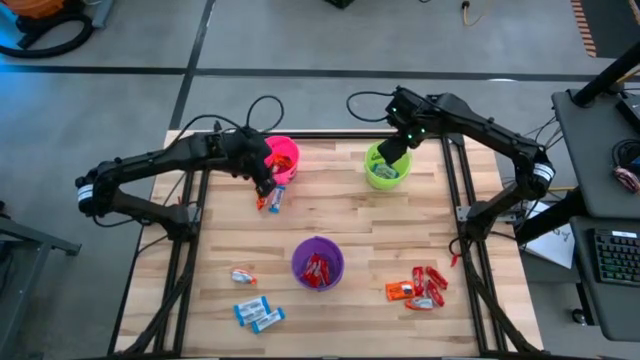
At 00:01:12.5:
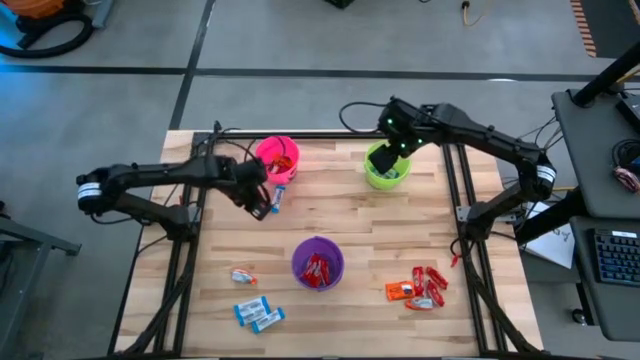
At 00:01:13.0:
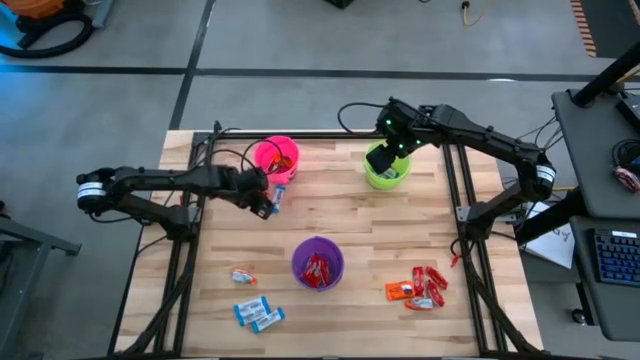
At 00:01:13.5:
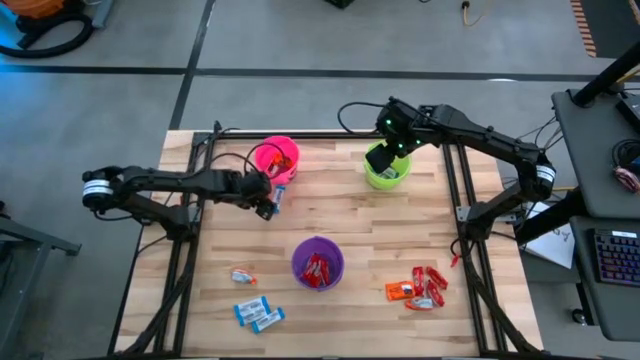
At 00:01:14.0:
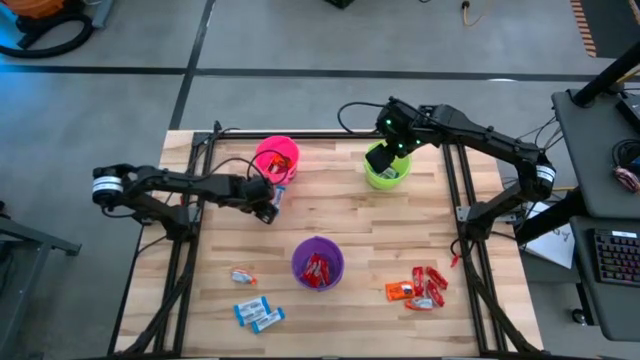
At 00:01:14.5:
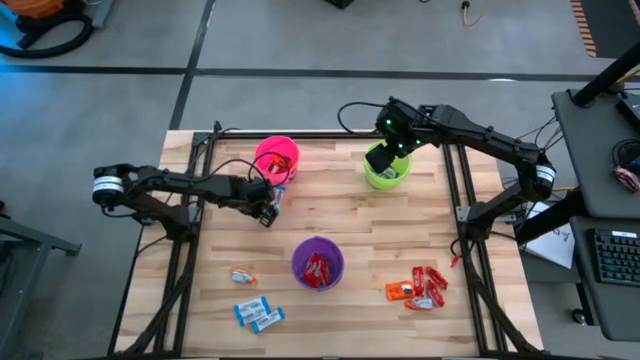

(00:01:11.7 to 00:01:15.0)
Task: Sort candy
Put the orange chocolate into the pink bucket

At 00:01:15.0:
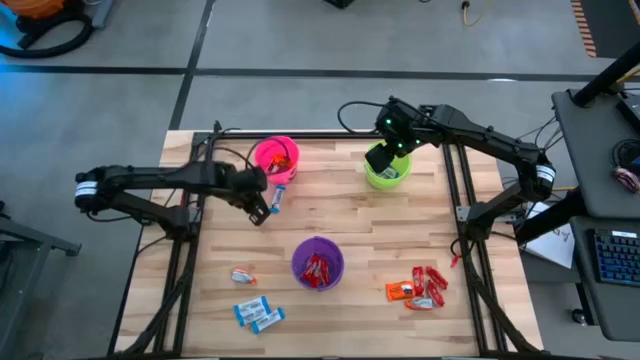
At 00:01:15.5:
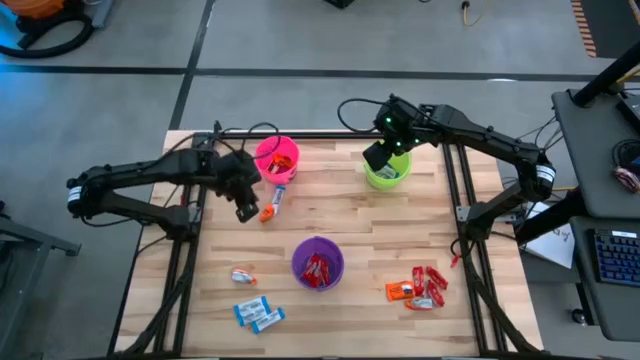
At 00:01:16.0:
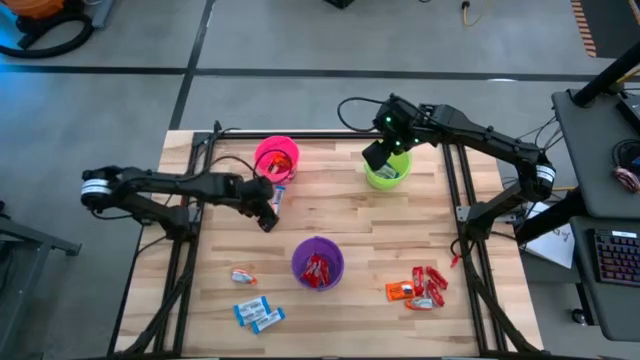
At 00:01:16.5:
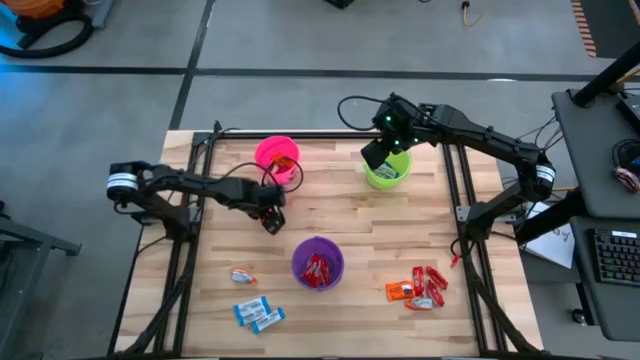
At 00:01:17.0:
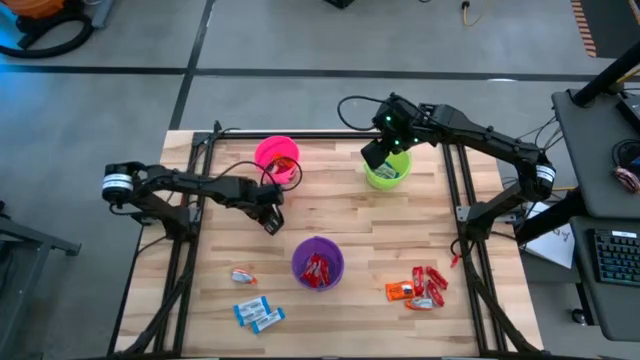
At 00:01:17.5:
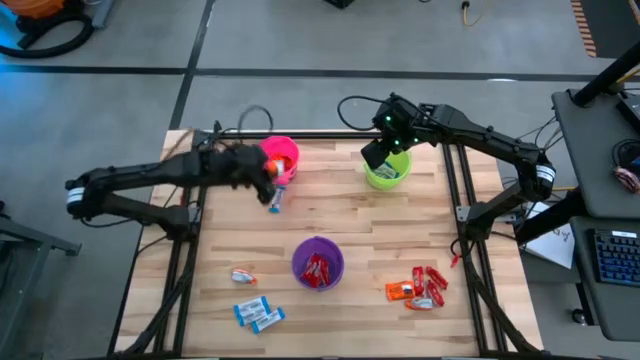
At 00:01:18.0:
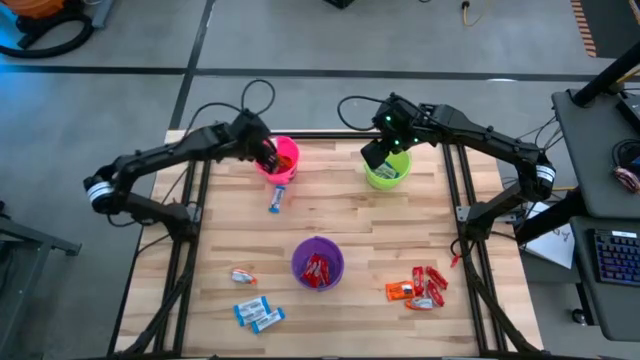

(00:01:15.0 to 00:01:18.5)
Put the orange chocolate into the pink bucket

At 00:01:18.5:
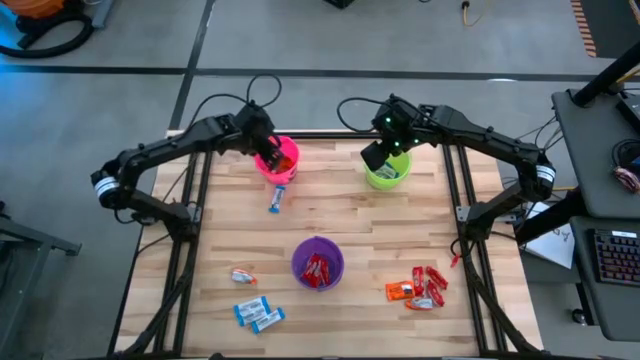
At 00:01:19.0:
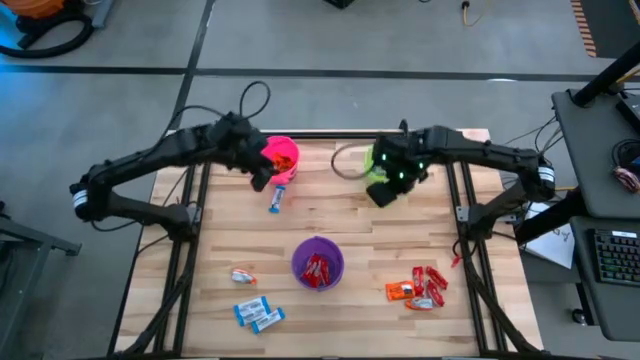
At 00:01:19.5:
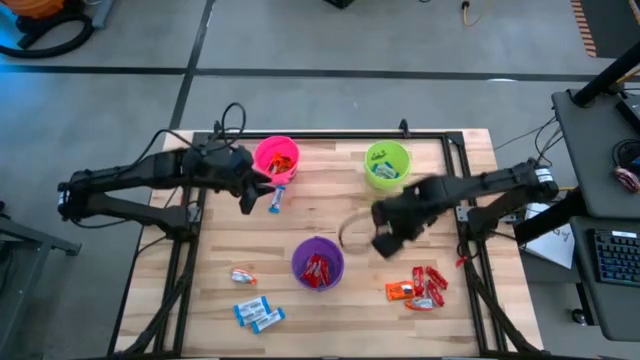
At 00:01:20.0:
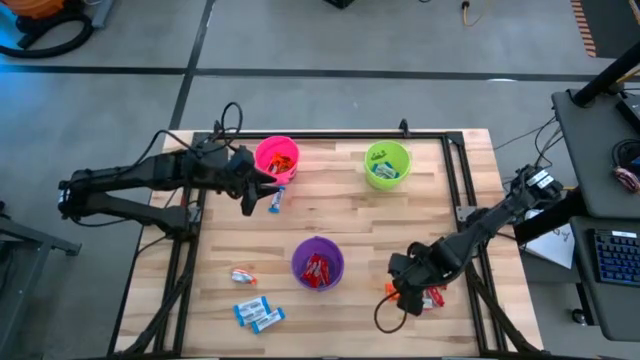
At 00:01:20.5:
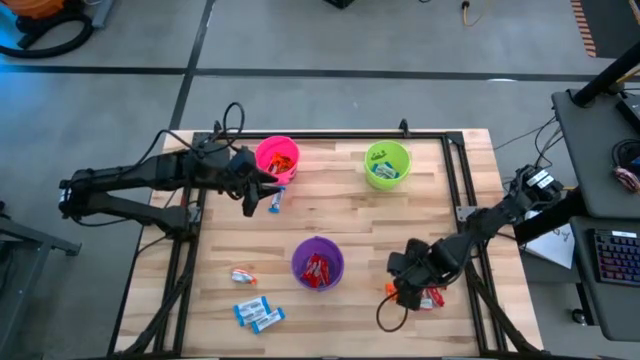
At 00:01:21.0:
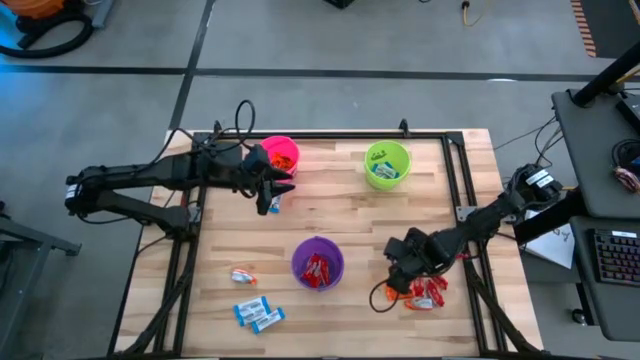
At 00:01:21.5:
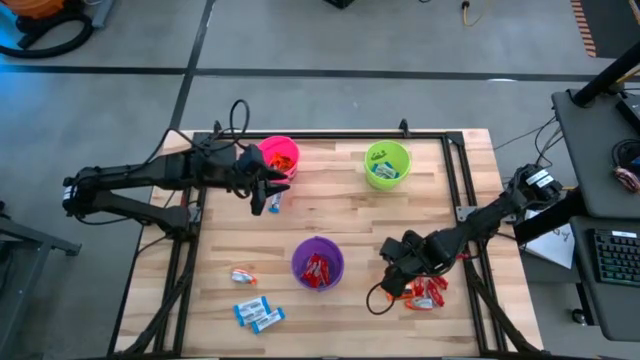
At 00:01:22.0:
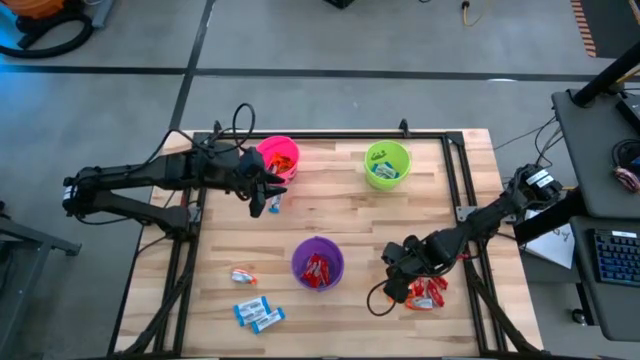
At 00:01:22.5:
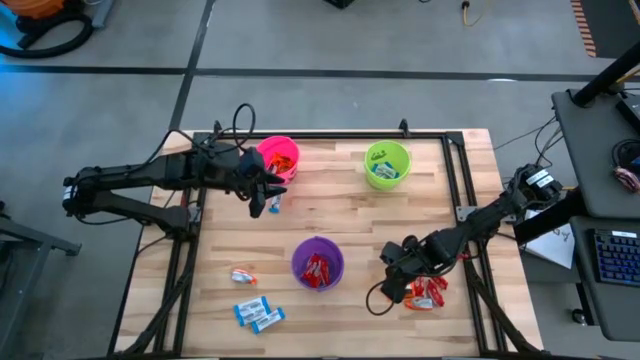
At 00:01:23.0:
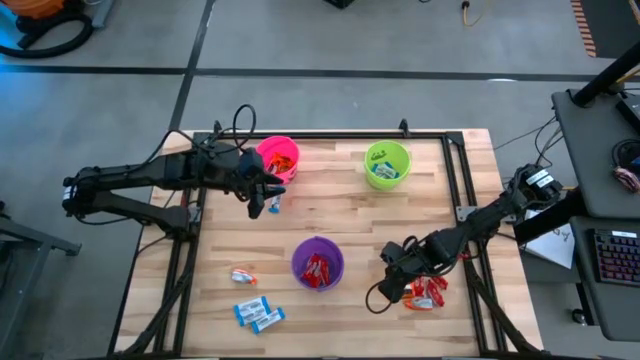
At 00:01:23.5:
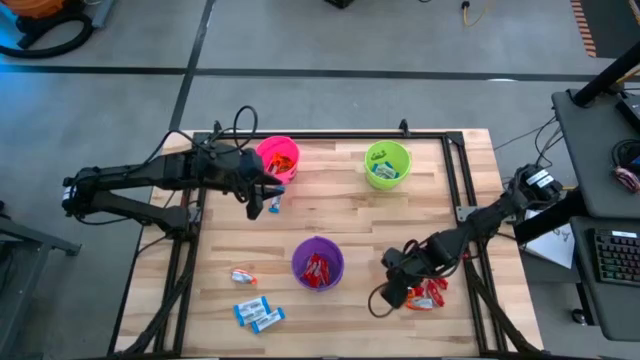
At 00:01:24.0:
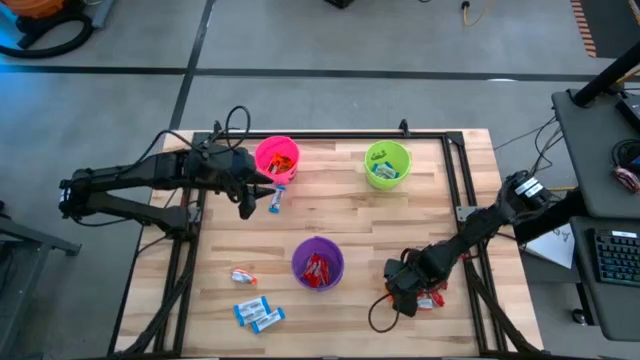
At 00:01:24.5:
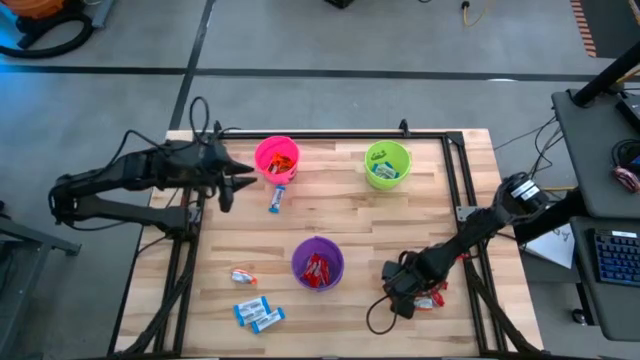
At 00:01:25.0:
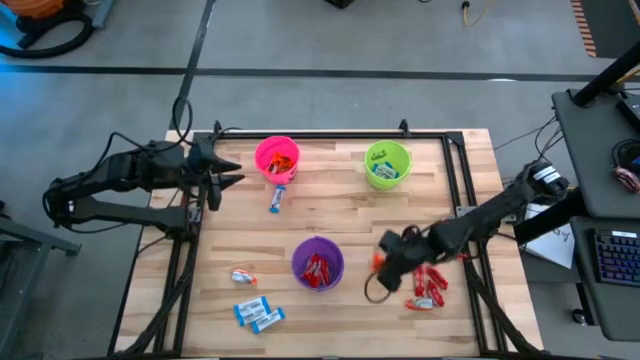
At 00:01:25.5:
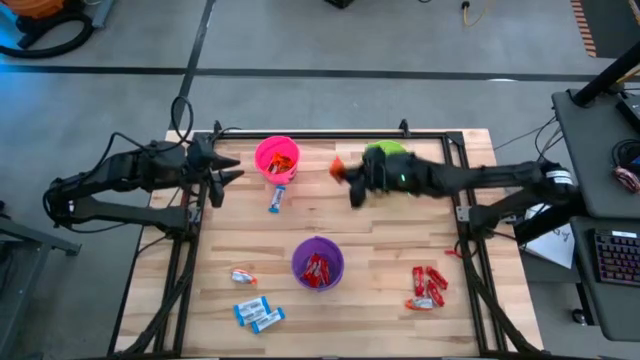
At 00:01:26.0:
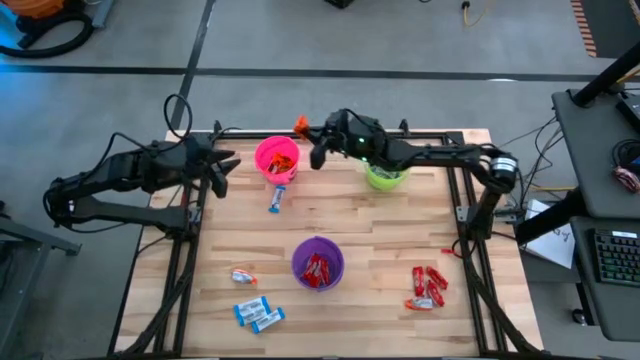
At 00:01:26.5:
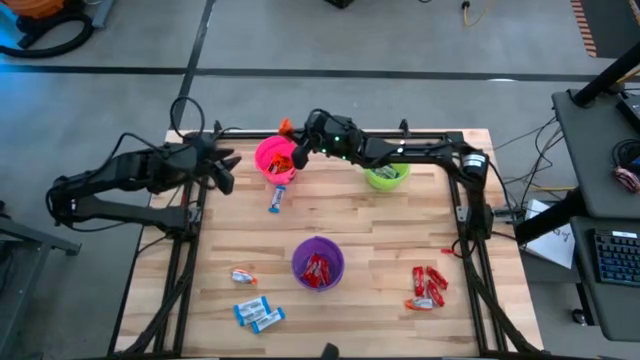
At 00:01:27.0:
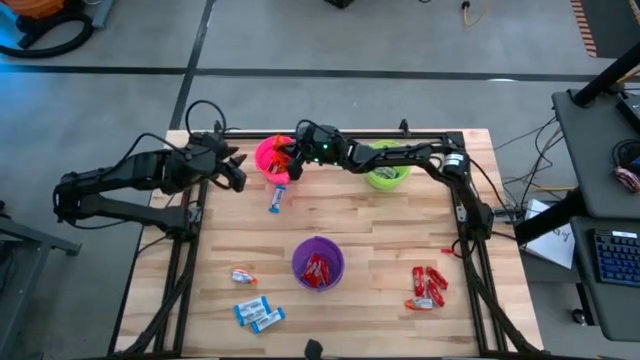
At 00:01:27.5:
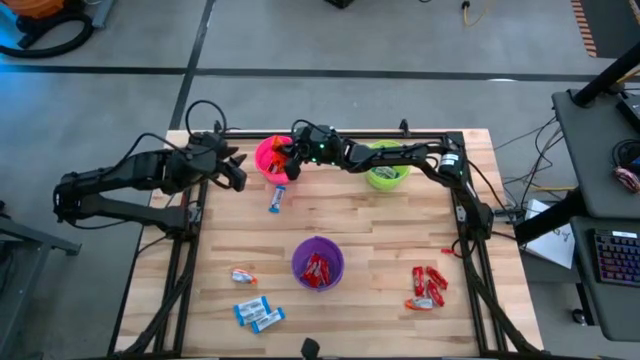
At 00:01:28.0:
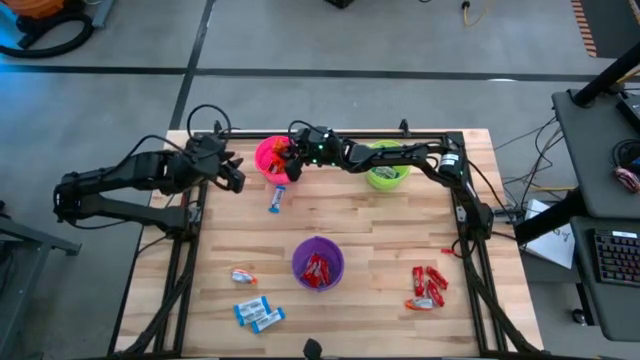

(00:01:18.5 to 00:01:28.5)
Put the orange chocolate into the pink bucket

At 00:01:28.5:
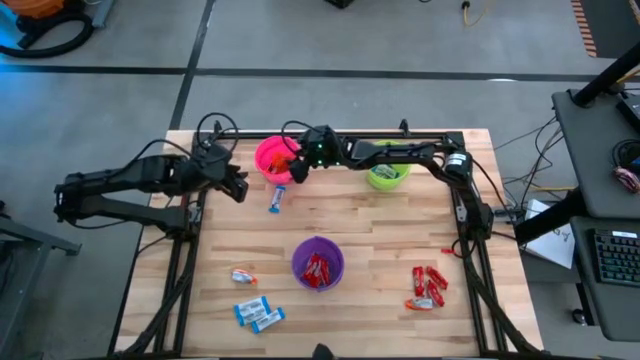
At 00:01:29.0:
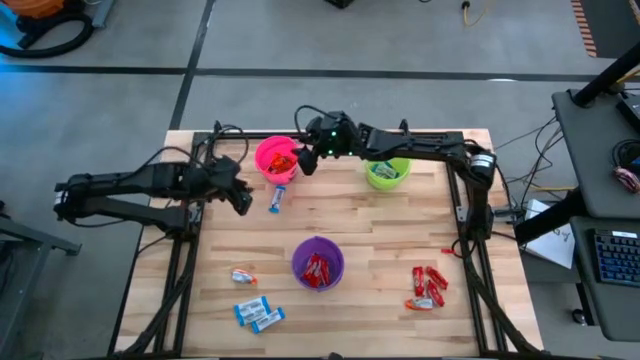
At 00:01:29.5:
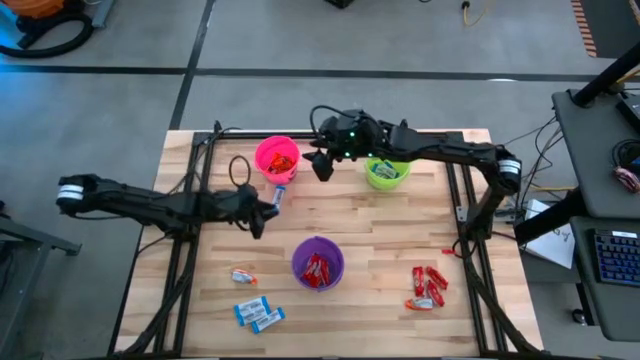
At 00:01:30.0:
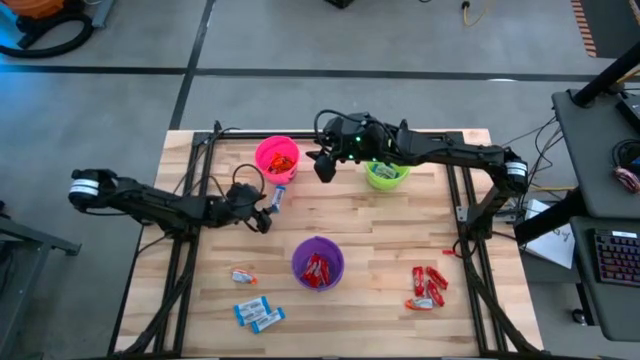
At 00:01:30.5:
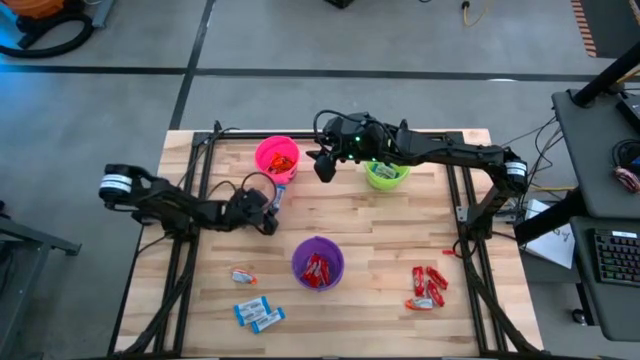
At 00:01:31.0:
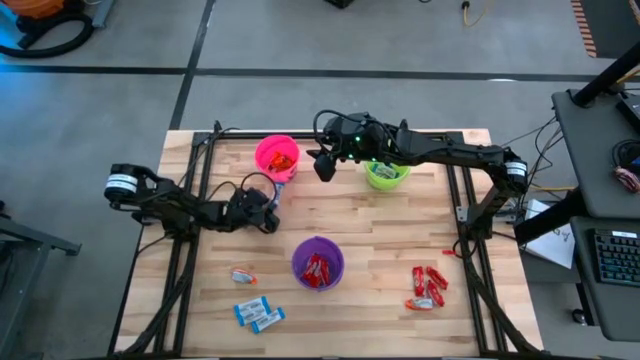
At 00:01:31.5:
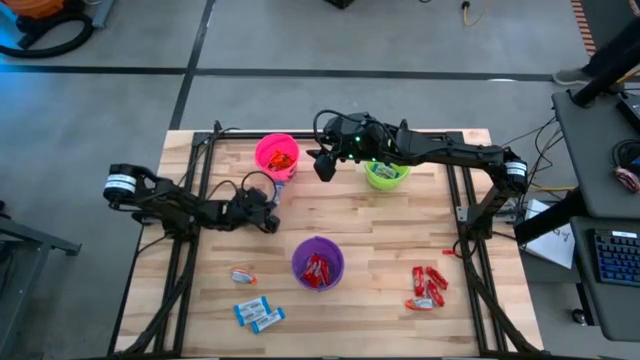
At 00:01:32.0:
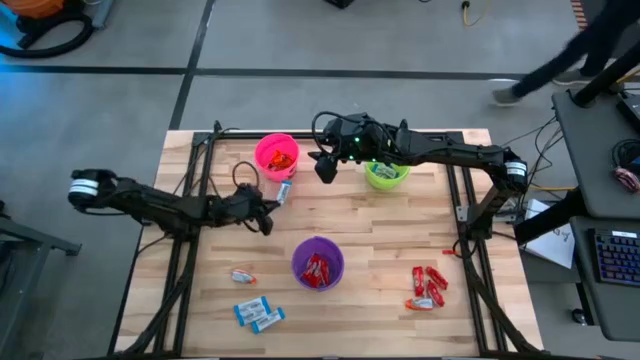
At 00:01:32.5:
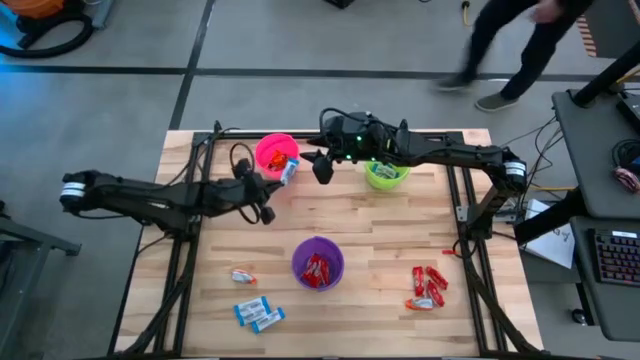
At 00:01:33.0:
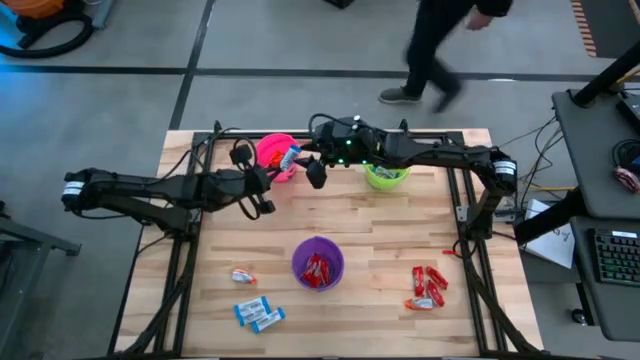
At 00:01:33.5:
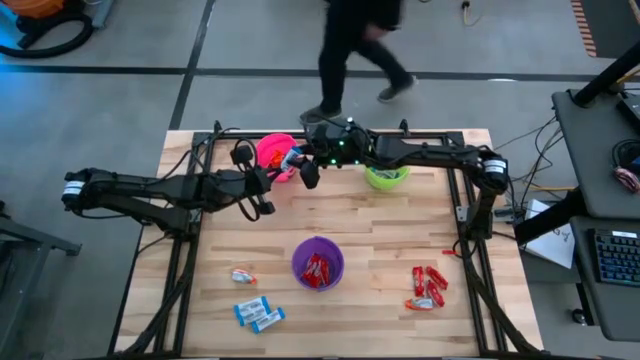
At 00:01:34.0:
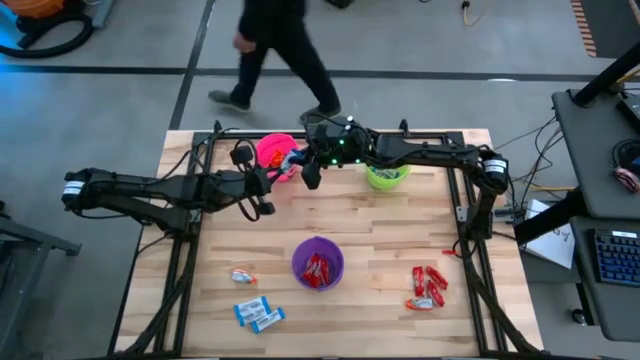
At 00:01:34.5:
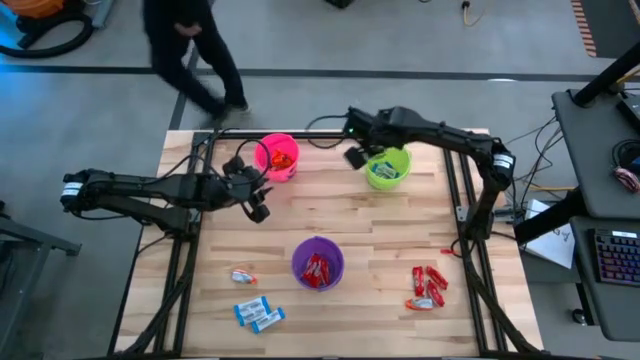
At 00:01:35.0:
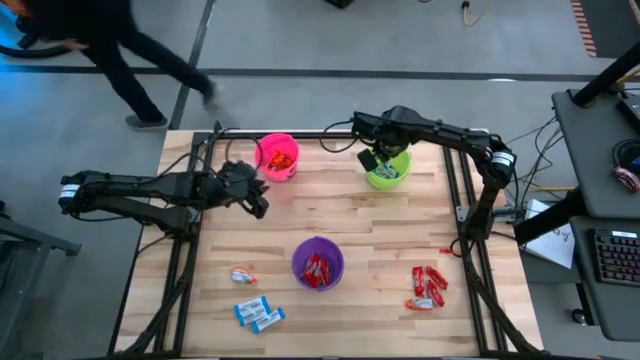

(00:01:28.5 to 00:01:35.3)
Put the white-blue chocolate into the green bucket
